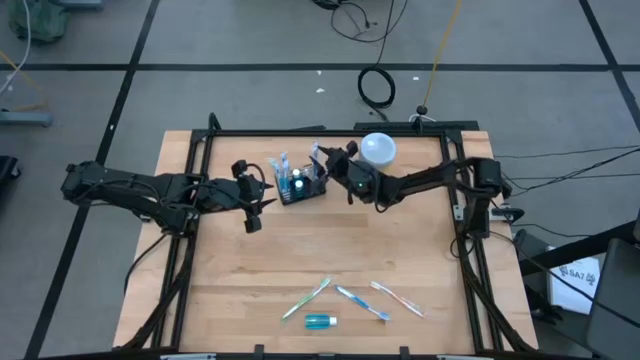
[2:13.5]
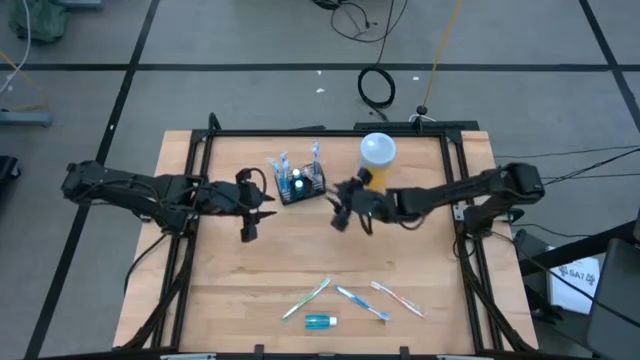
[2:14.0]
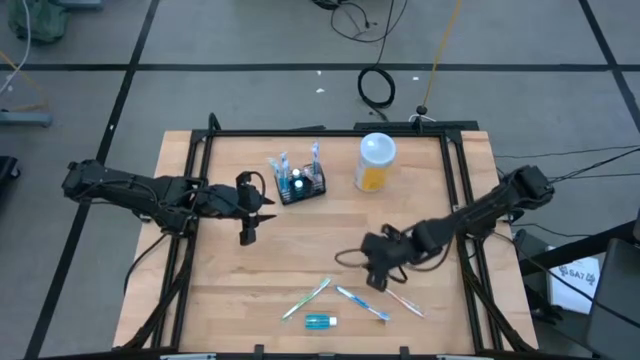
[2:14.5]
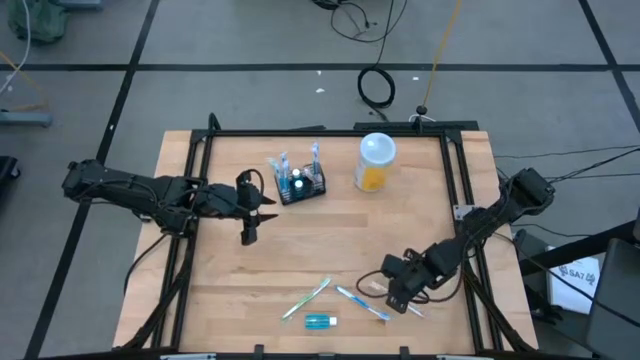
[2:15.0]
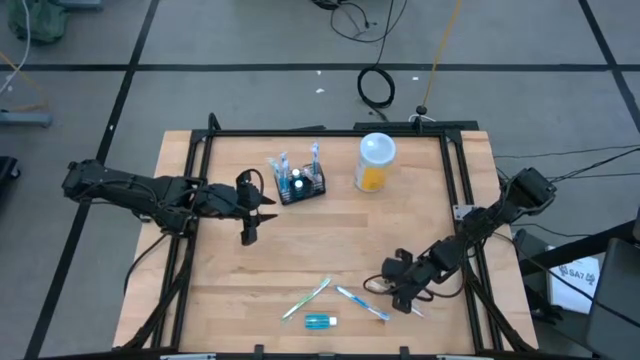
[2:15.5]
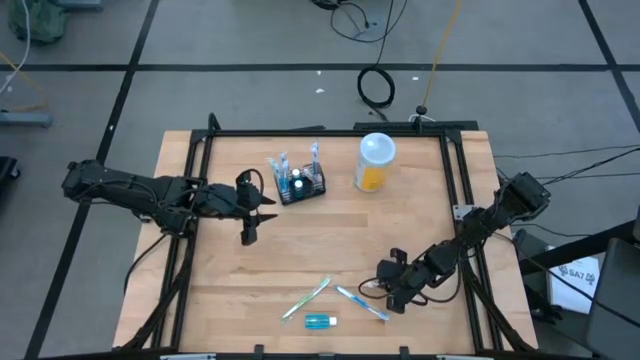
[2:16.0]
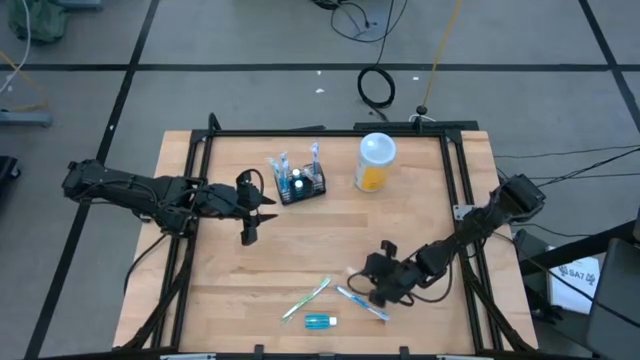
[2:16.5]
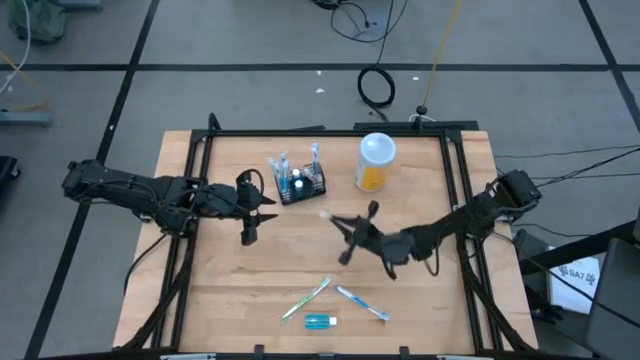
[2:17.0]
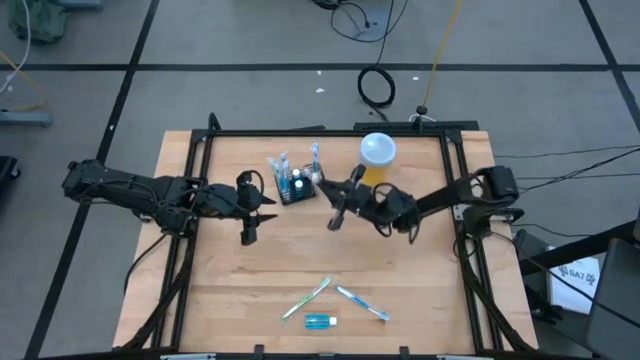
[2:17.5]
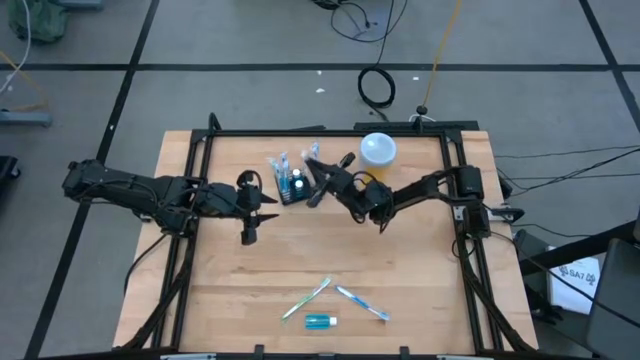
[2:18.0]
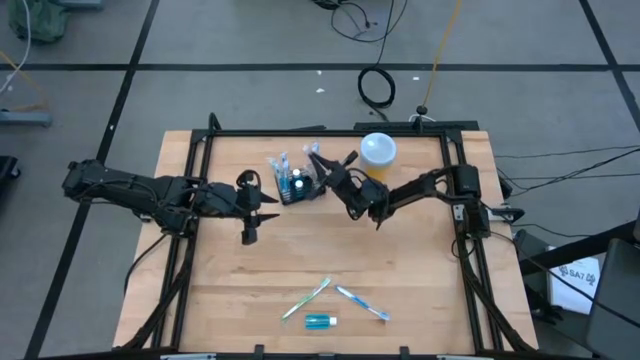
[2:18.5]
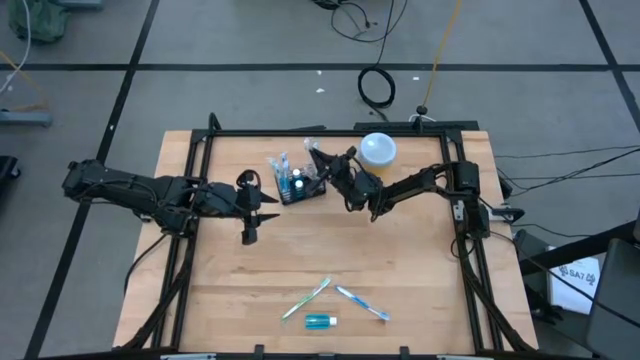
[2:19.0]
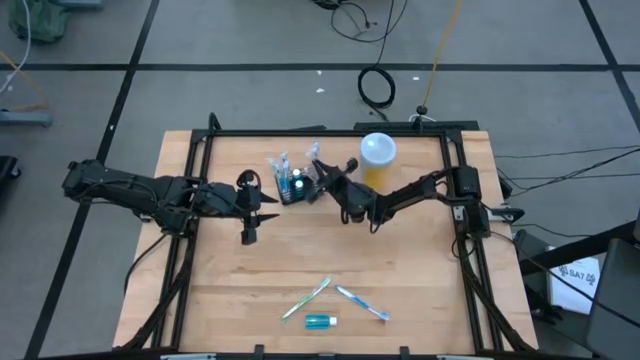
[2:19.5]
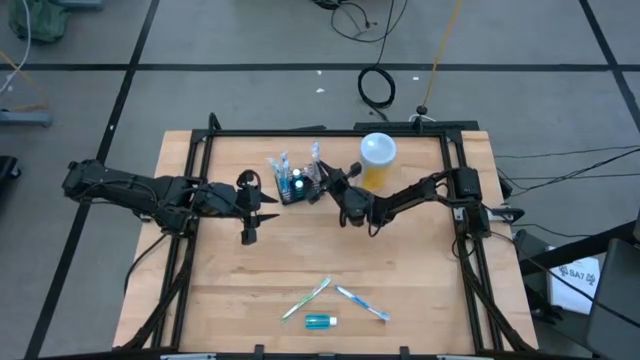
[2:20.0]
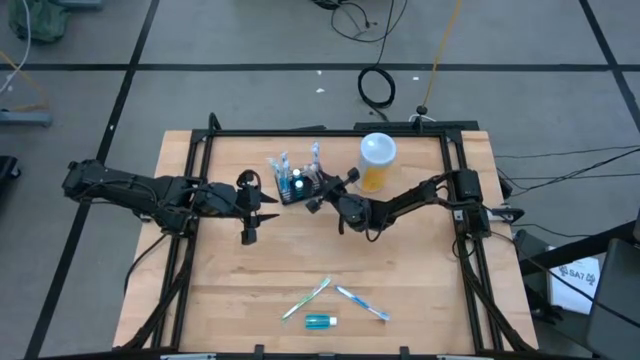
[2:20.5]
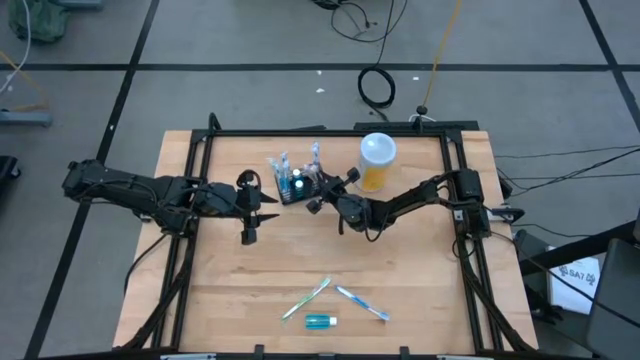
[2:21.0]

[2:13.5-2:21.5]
Task: Pick & Place toothbrushing station
Put the orange toothbrush into the black mesh organizer

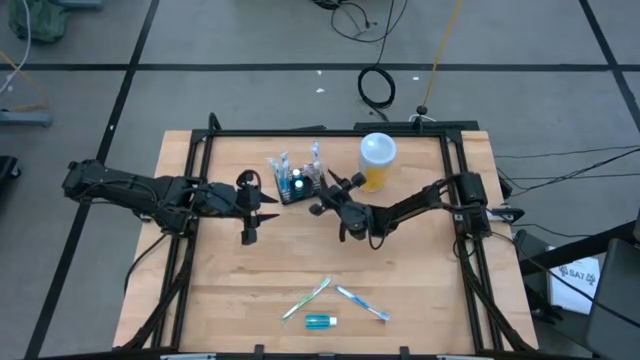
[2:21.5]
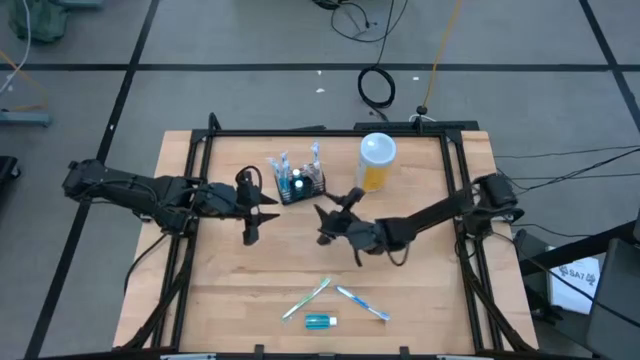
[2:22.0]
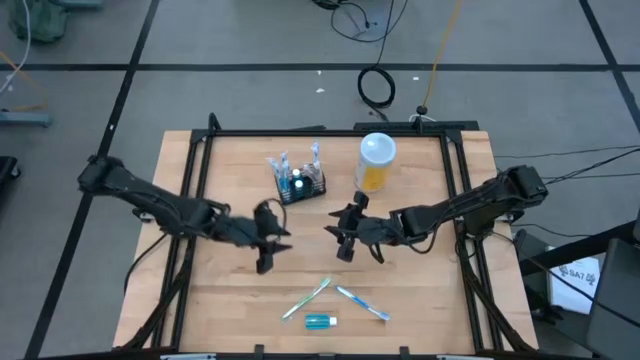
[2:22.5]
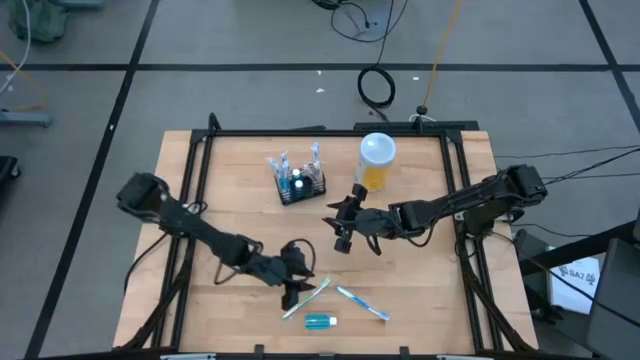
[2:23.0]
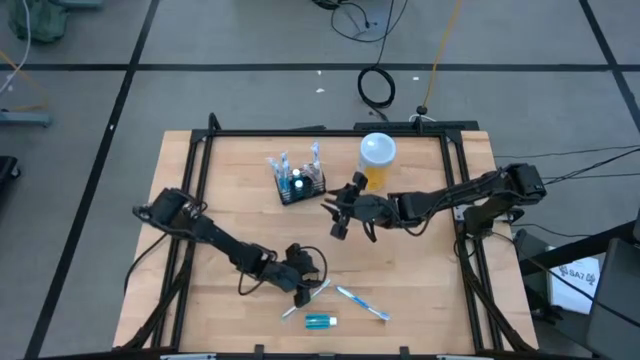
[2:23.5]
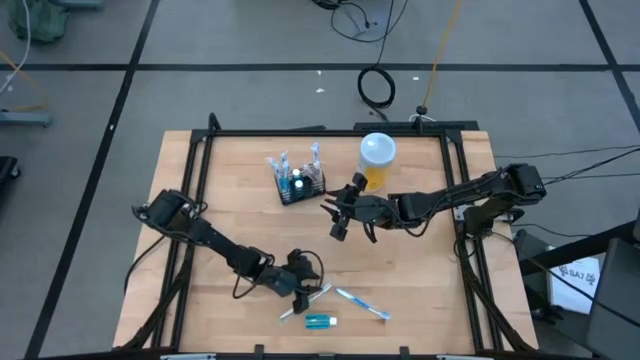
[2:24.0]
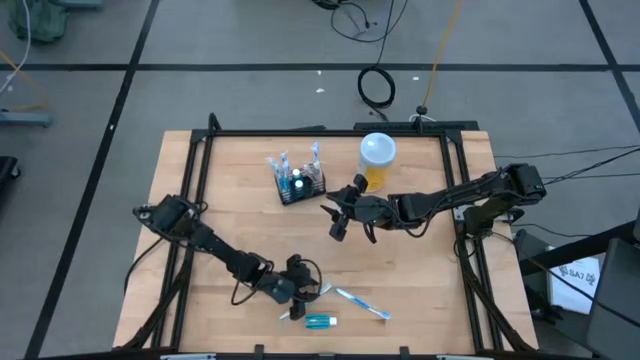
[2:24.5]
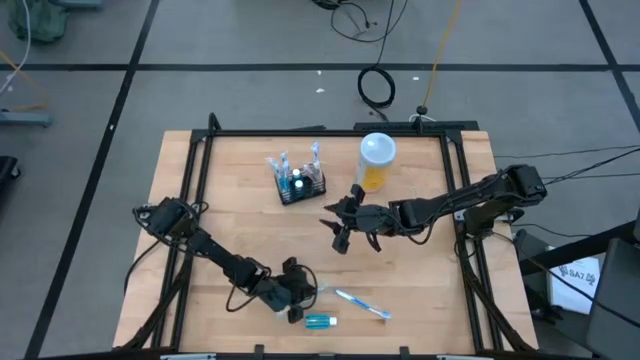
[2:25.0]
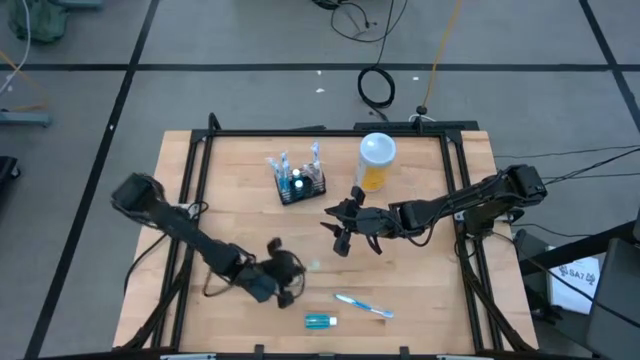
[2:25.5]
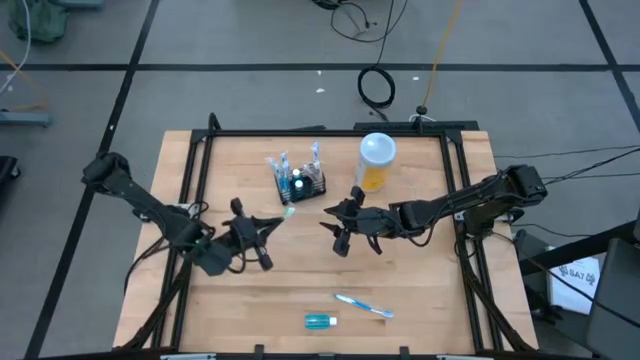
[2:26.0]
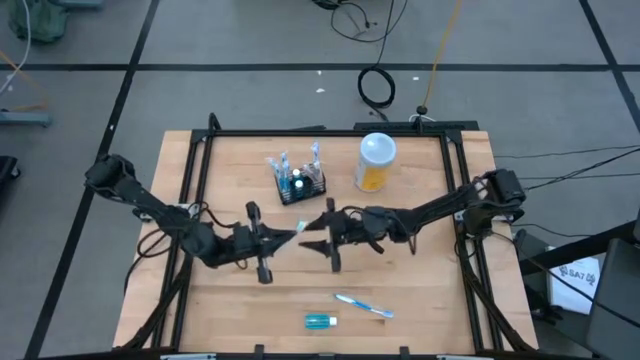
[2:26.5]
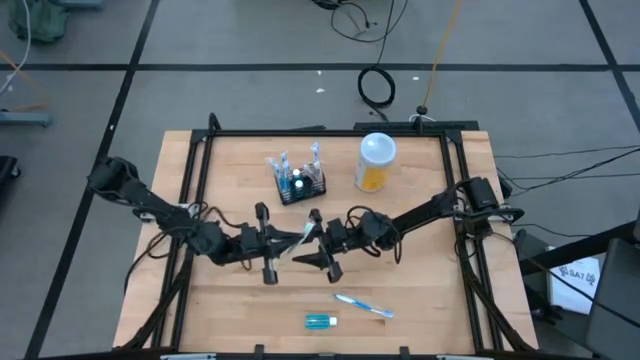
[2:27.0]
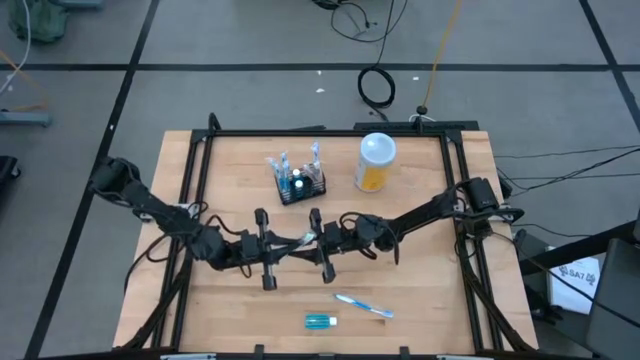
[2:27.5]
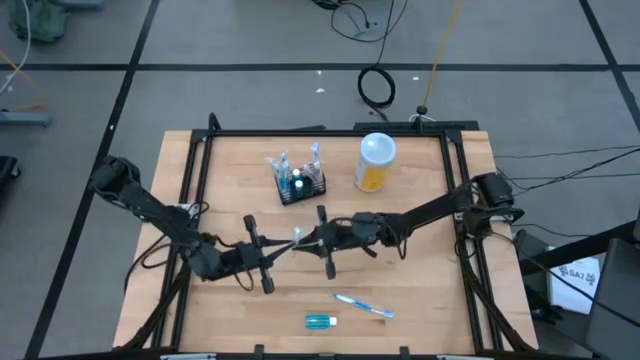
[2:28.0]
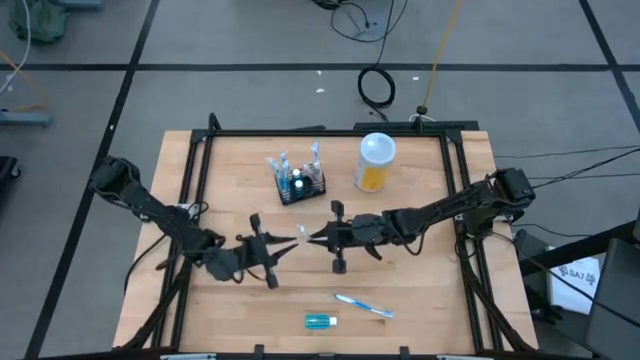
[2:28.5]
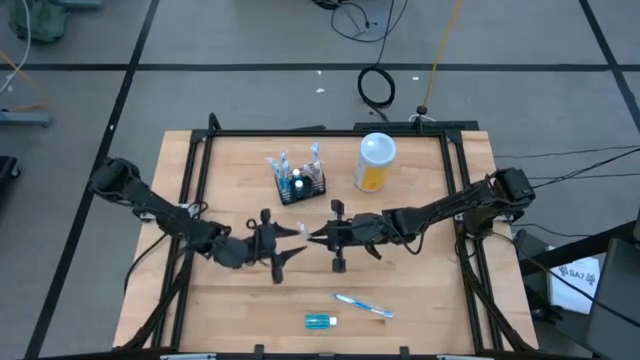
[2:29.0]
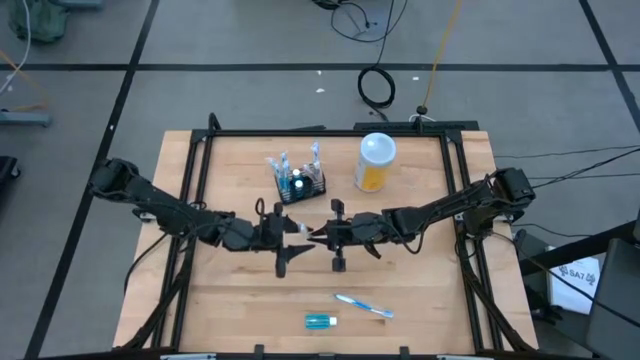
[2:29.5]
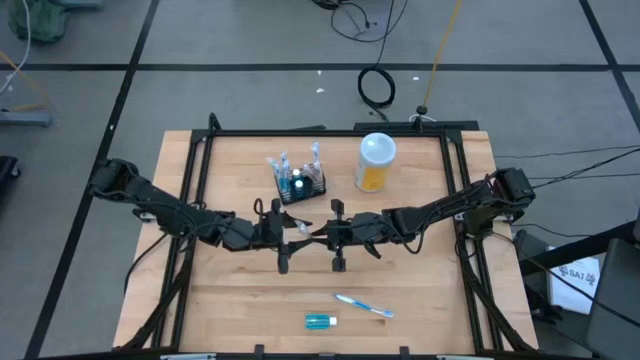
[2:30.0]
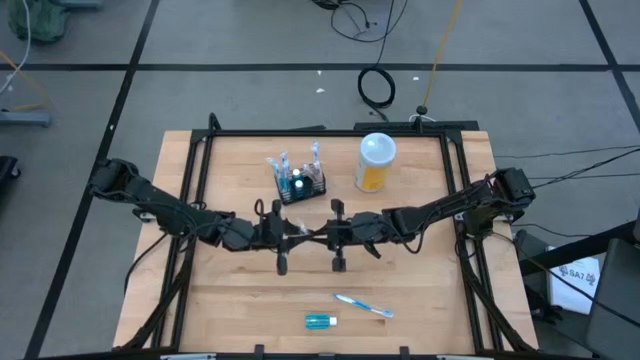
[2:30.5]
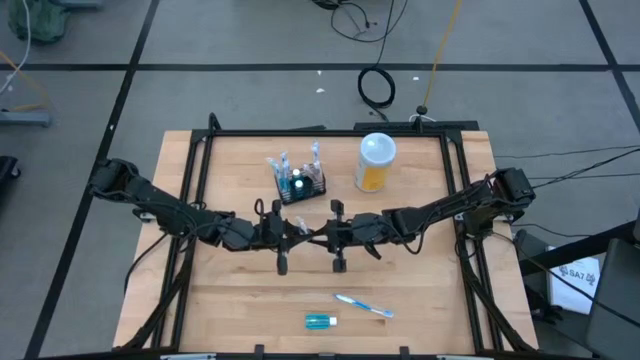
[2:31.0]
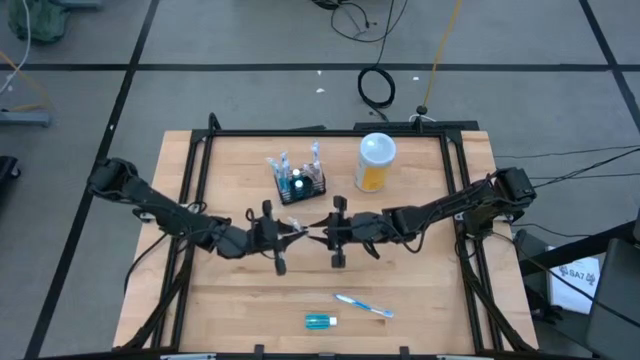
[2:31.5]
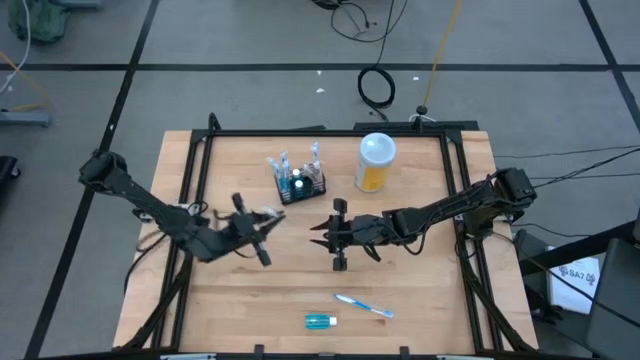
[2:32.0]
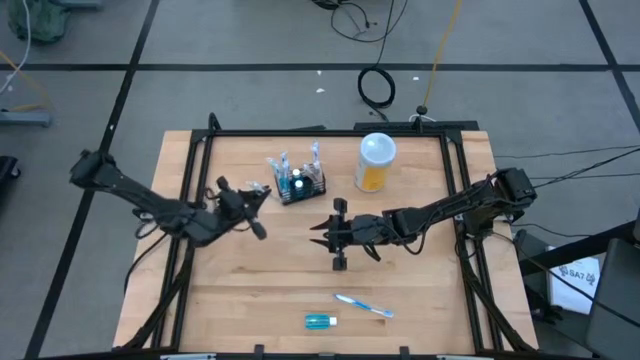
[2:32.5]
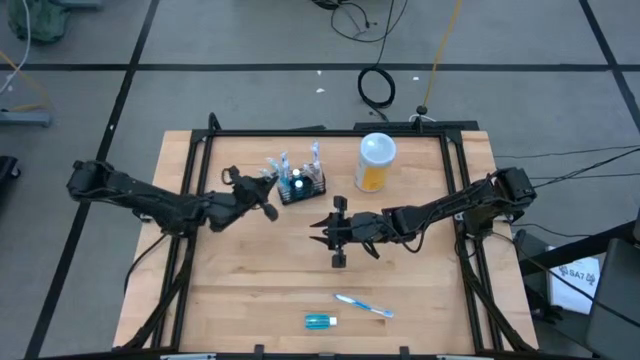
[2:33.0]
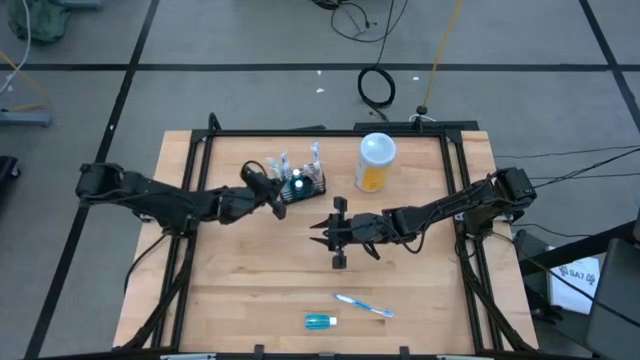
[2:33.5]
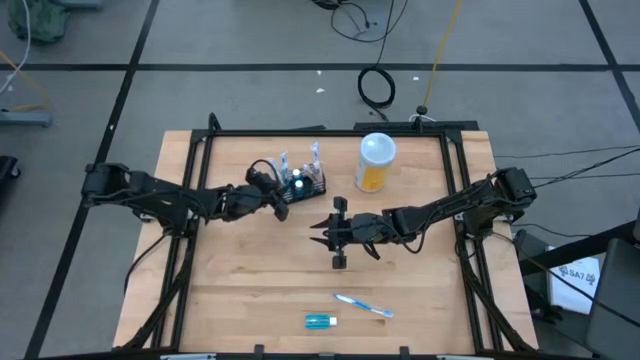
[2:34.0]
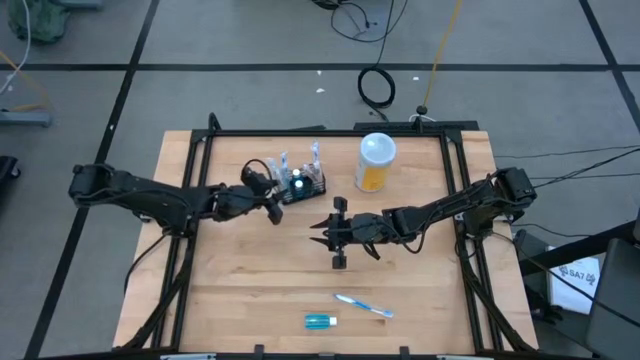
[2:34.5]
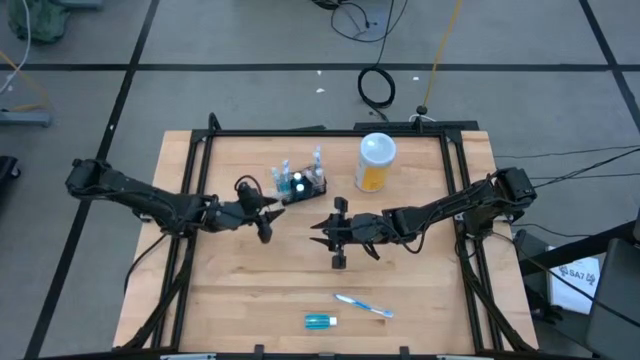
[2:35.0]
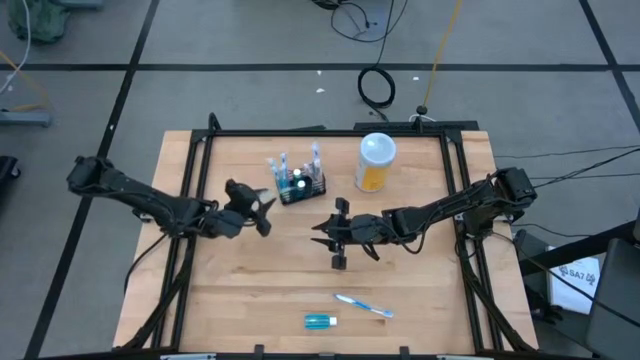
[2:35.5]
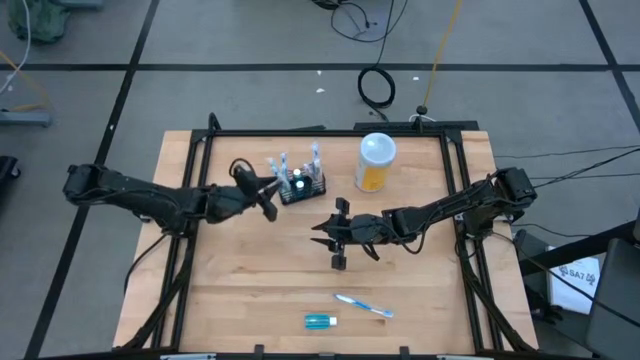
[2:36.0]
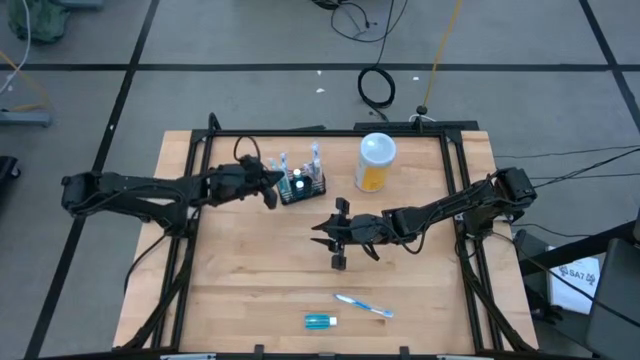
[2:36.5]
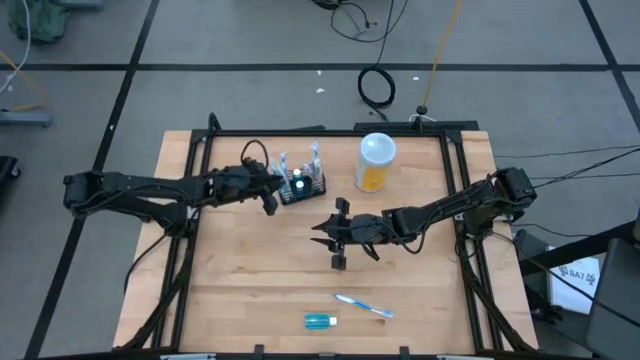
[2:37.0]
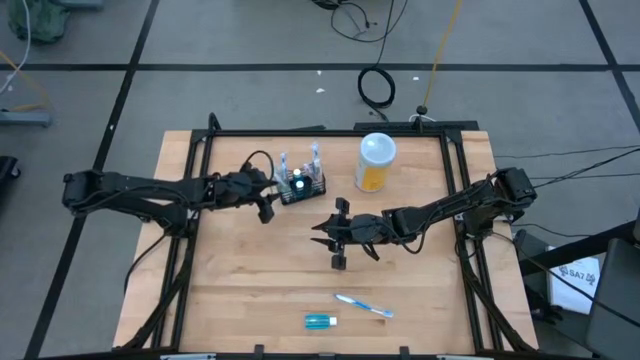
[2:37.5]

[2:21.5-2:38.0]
Put the green toothbrush into the black mesh organizer
